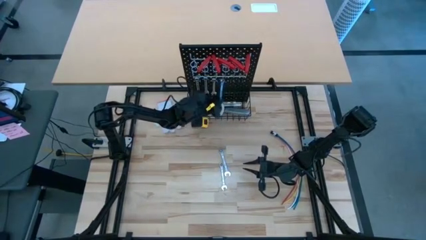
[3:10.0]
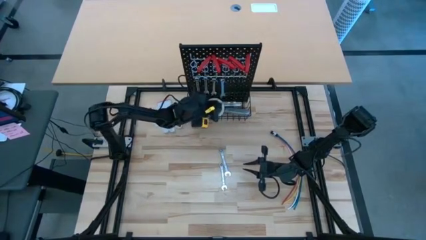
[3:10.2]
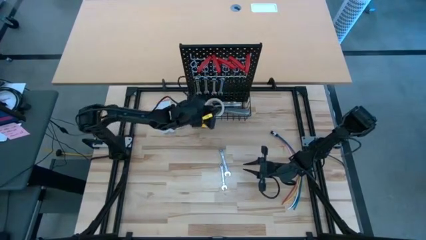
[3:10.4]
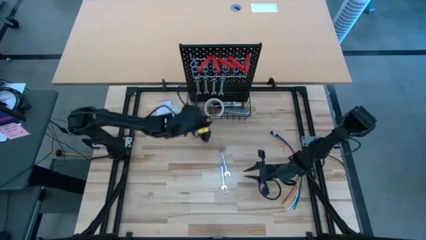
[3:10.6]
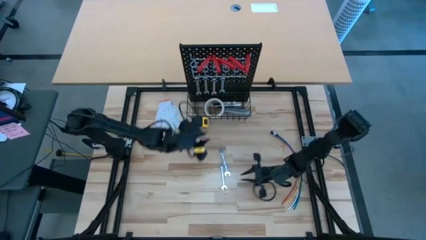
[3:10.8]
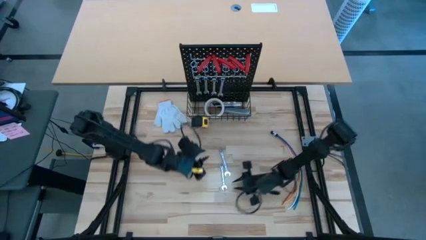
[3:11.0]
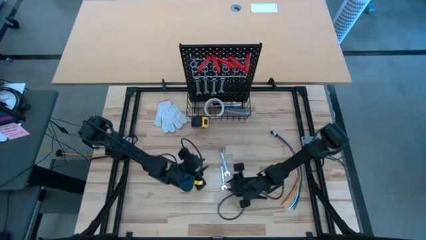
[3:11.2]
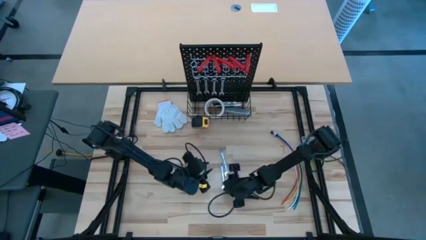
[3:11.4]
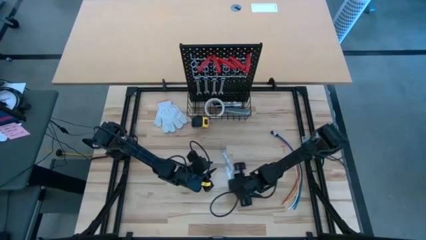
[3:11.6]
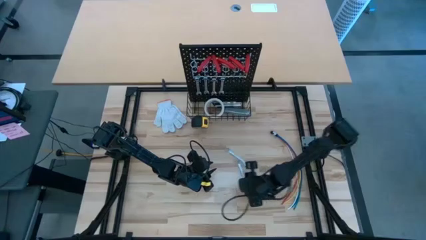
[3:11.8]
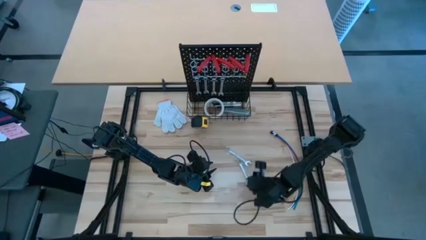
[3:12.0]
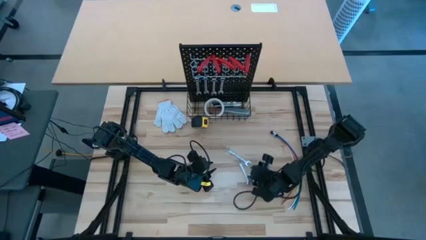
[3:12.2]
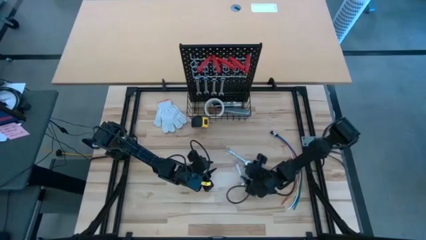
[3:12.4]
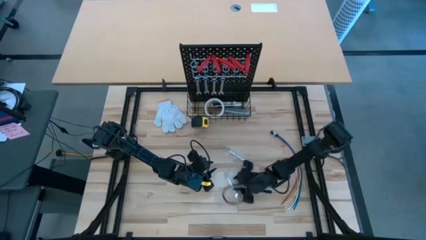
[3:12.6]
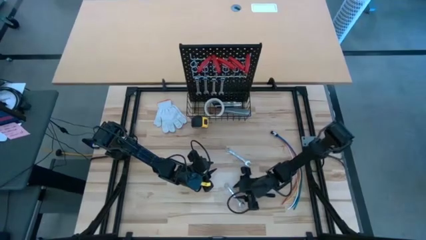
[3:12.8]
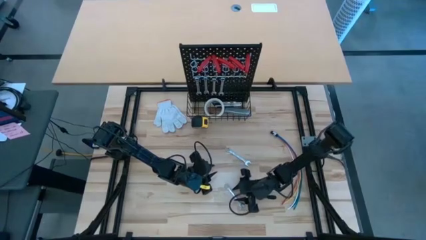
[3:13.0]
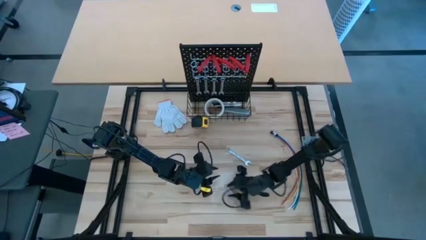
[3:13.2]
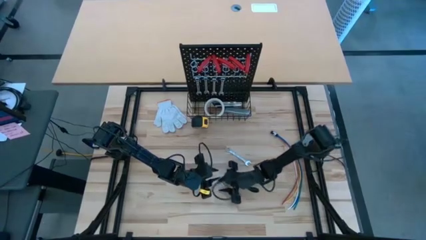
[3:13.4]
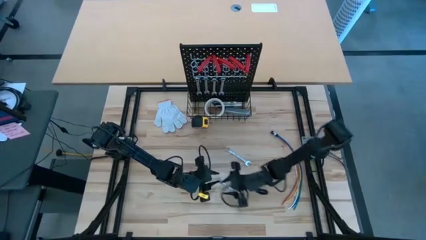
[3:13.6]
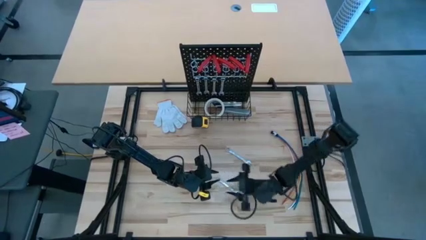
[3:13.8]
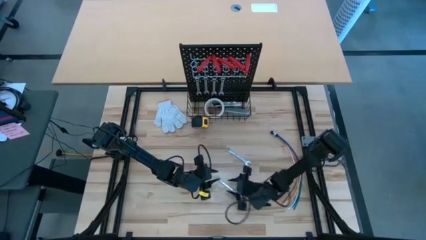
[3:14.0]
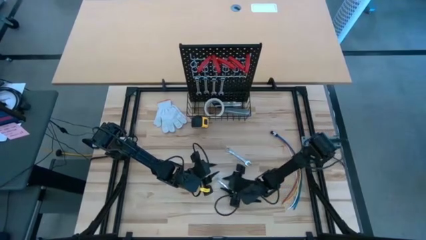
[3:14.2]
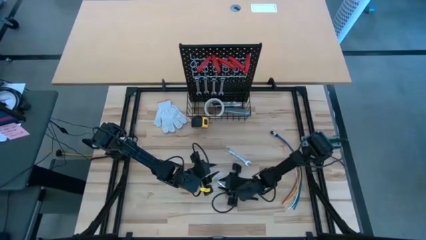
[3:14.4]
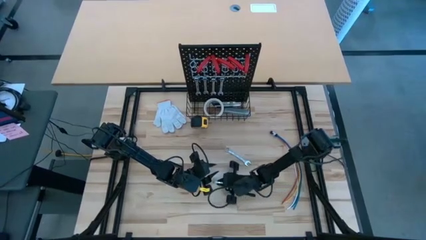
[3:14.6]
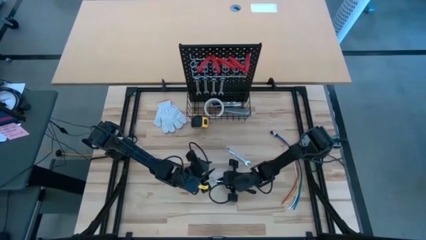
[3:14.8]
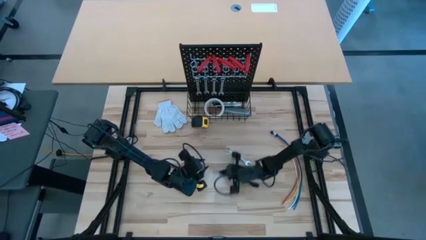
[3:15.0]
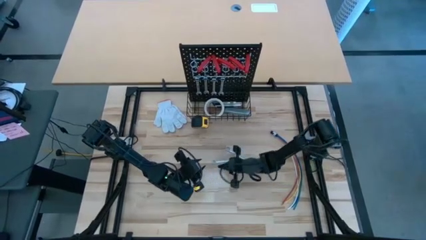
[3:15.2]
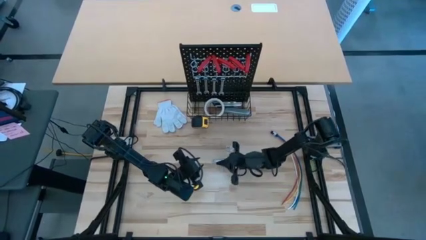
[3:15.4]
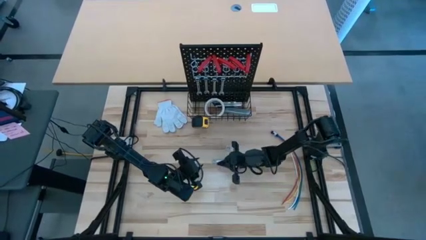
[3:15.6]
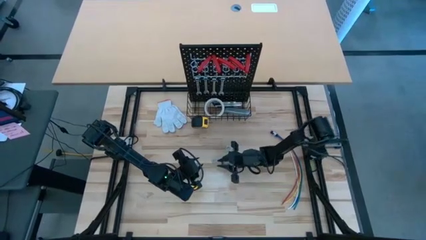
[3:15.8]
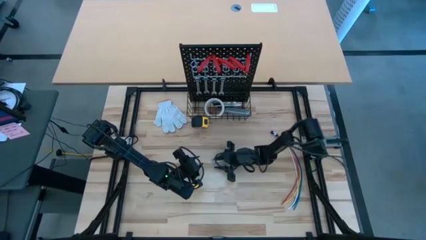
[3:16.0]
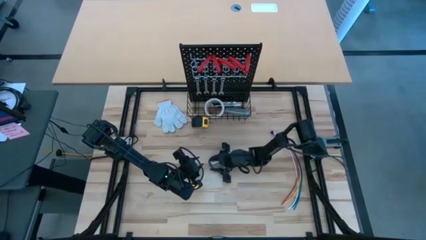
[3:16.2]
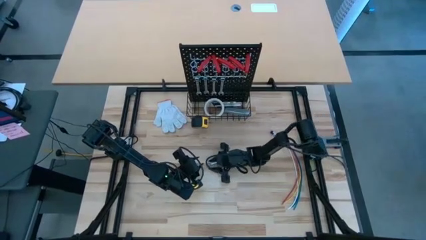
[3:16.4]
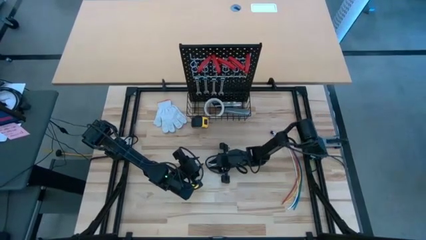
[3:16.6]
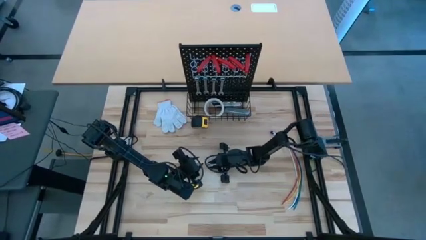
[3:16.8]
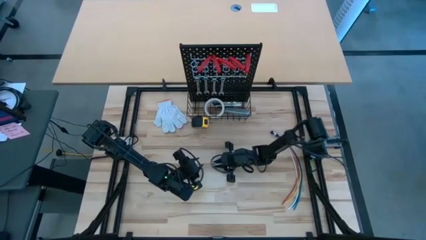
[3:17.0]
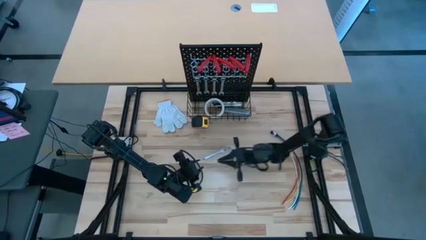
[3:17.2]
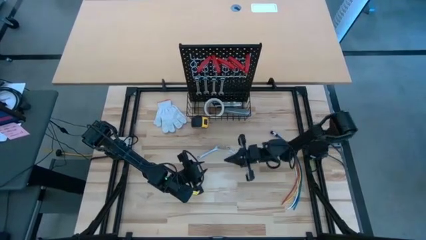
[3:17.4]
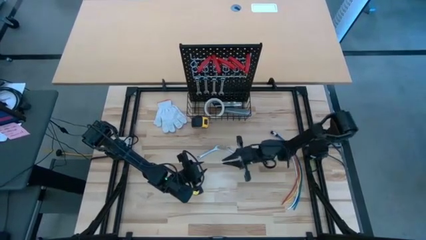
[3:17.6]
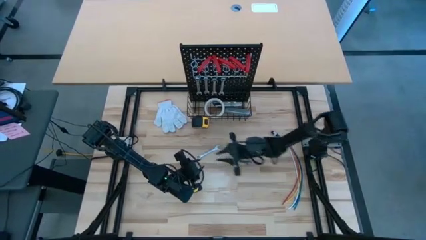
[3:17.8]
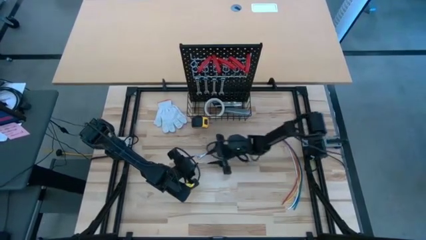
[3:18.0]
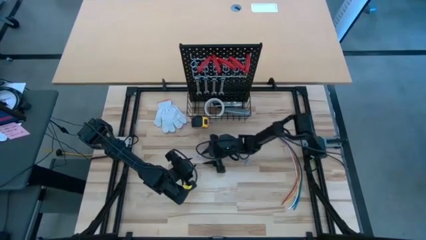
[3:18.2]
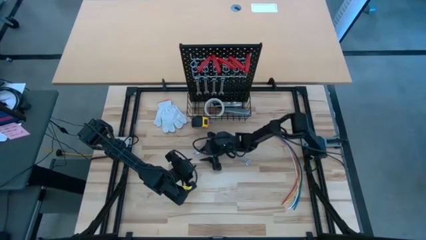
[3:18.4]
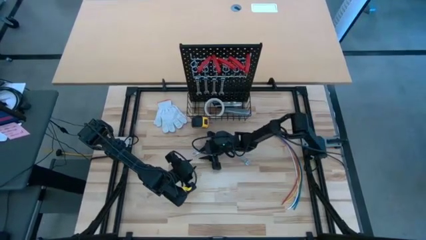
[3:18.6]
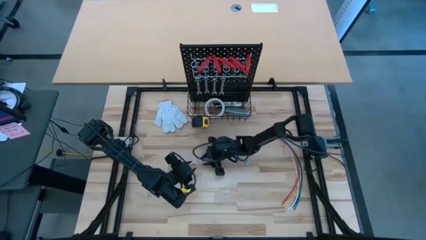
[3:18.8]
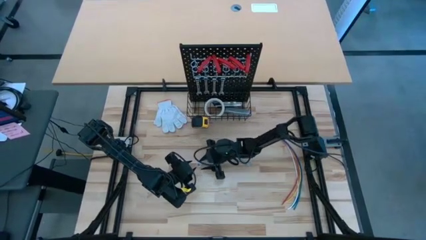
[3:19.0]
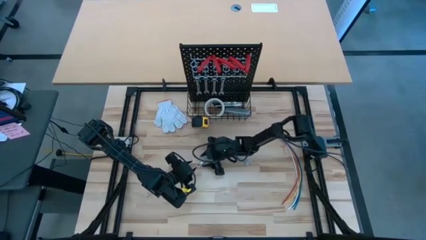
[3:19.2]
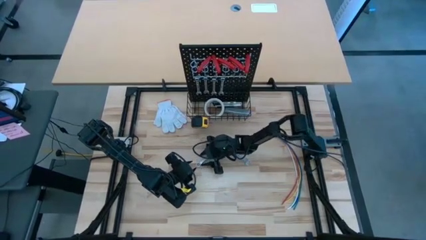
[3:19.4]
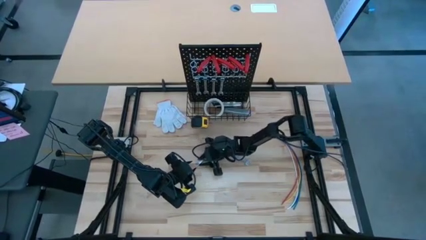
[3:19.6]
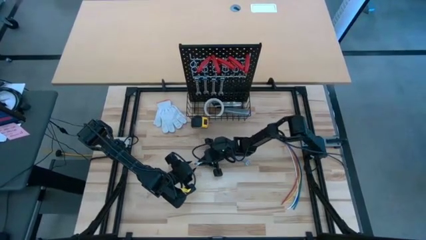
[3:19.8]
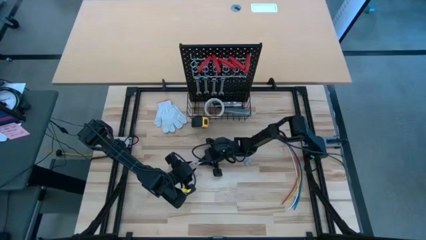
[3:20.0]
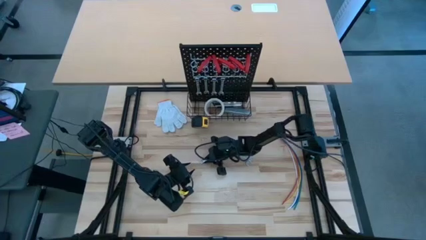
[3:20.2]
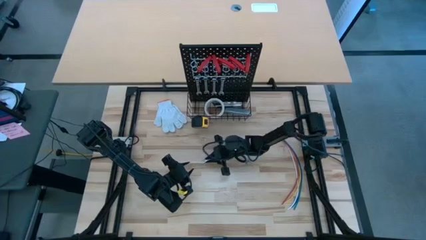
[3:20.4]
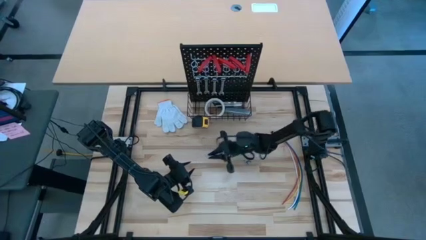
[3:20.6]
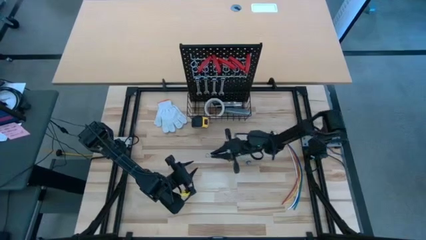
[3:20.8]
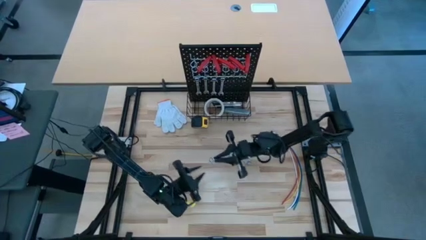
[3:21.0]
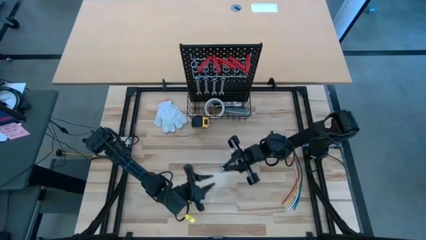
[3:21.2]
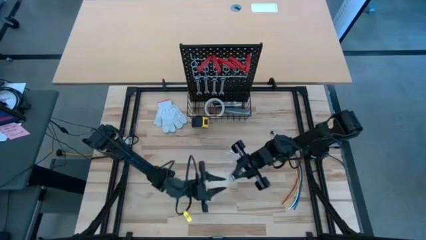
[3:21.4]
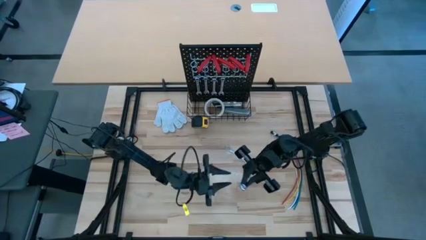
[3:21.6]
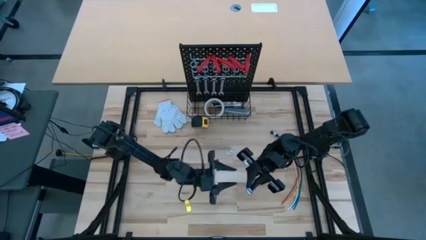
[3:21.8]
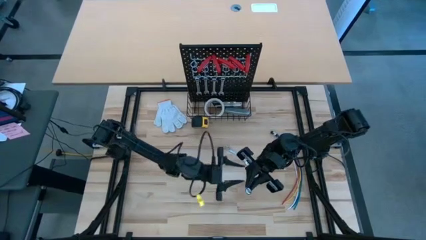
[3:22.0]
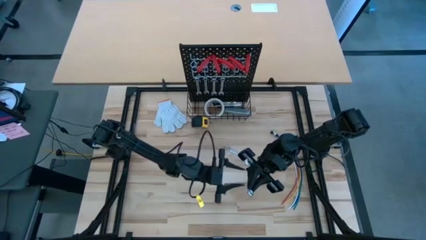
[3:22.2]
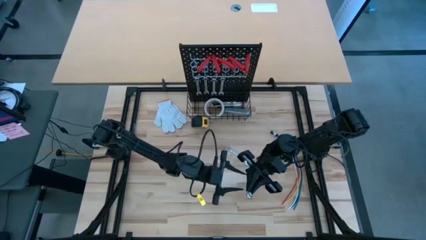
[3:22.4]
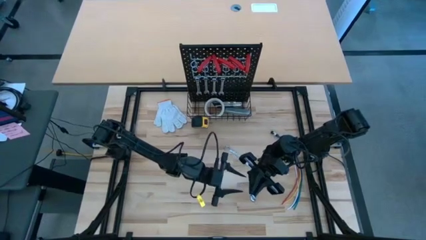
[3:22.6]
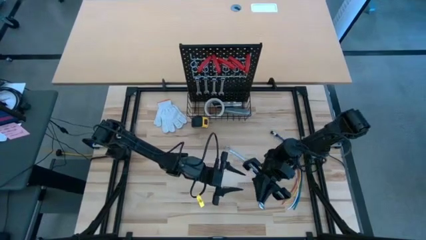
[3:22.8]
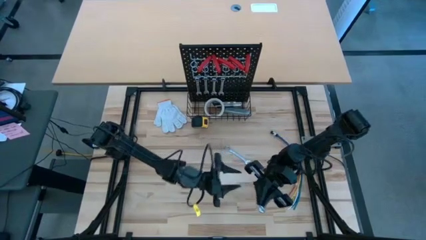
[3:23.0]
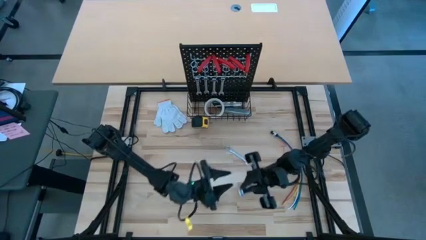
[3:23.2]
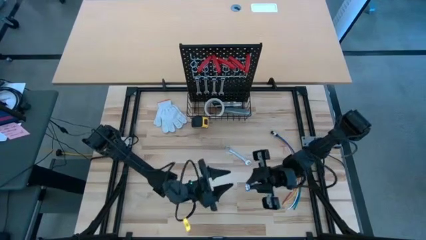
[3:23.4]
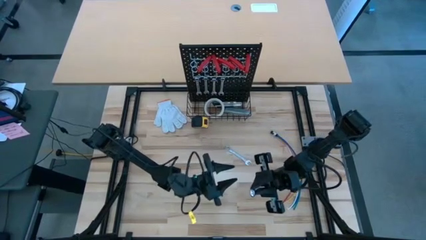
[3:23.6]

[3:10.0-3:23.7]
Task: Hang tools onto peg board
Hang the silver wrench on the pegboard

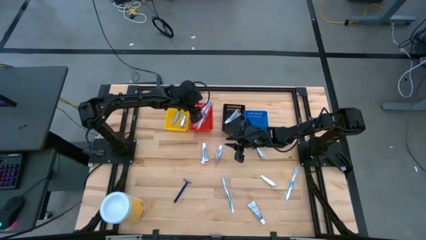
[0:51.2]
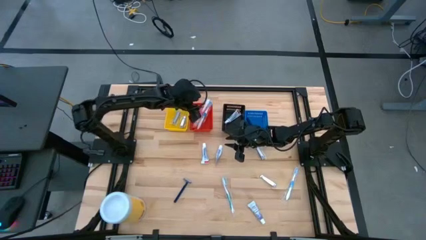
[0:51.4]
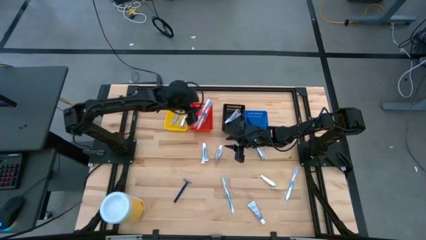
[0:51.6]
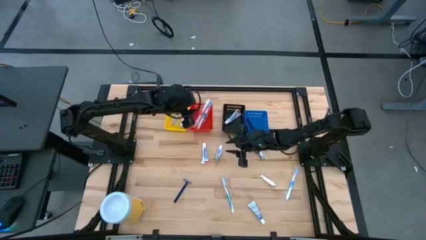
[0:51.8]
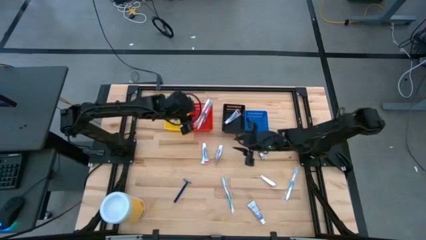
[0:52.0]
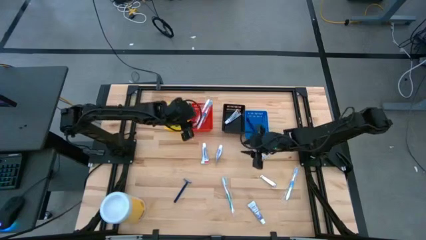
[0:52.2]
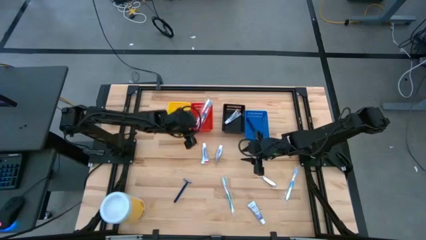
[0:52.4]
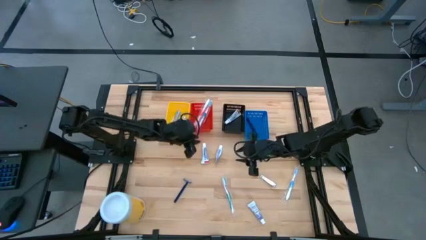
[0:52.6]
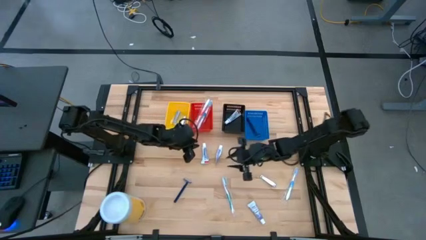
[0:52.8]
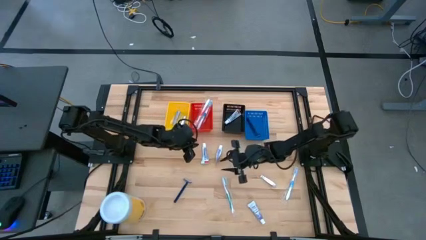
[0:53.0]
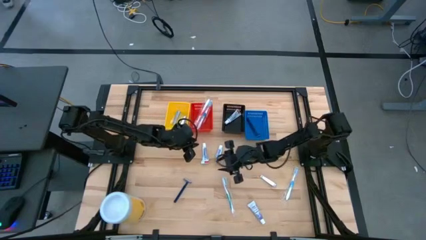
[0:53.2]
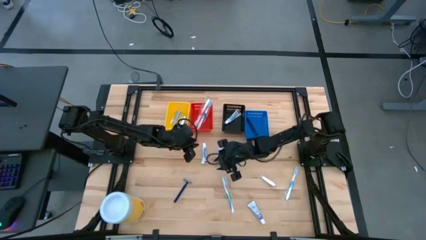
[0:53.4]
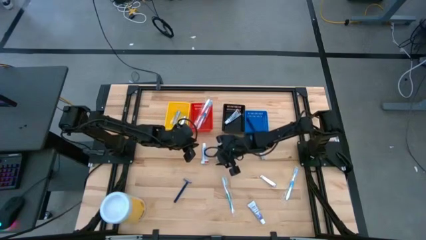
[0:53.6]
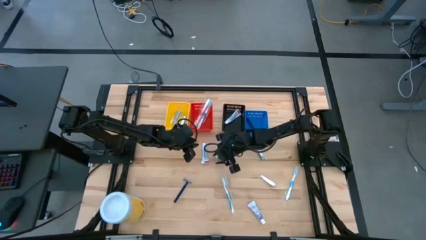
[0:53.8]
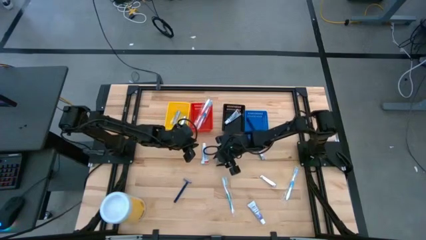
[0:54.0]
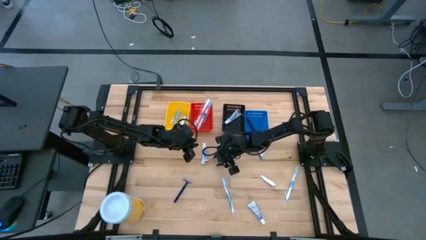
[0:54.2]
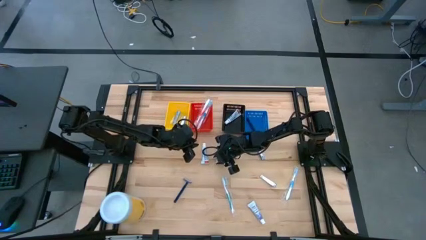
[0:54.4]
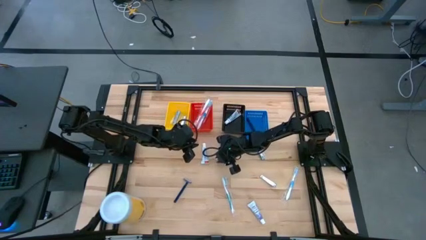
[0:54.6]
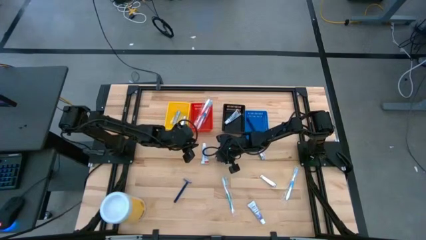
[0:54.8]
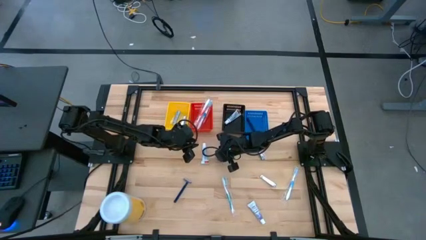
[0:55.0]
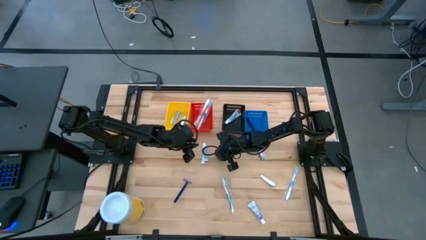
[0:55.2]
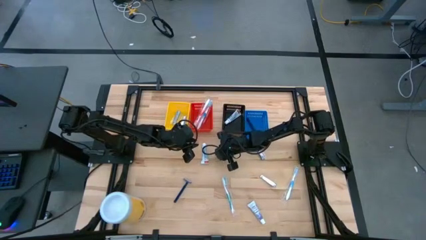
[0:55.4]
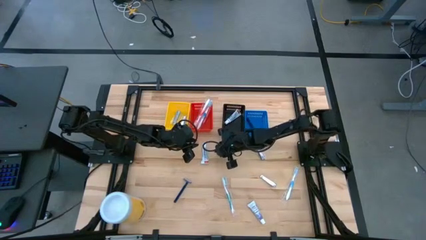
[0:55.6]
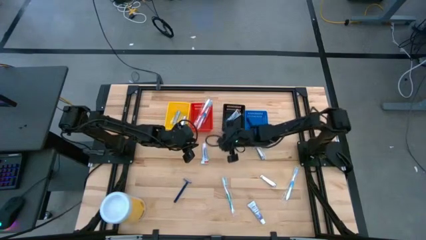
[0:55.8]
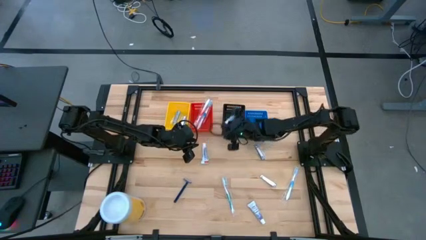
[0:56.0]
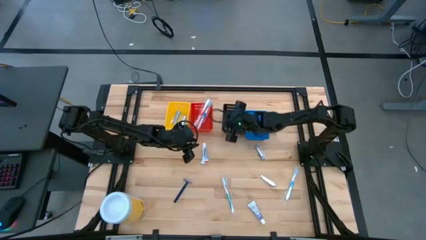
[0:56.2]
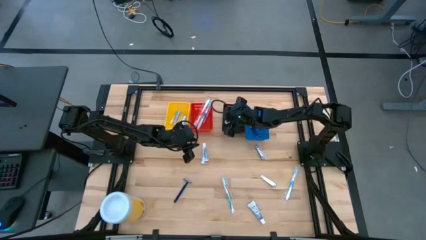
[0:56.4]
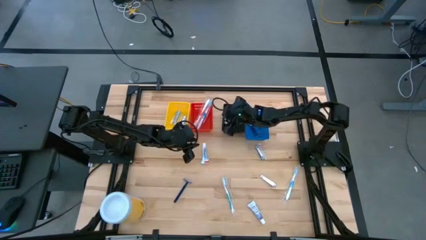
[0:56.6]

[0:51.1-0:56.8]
Task: Pick & Place Travel size toiletries
Put the white toothpaste into the black bin
